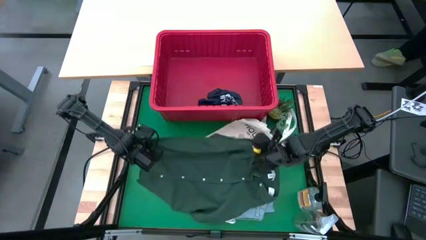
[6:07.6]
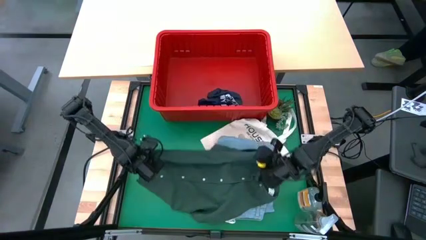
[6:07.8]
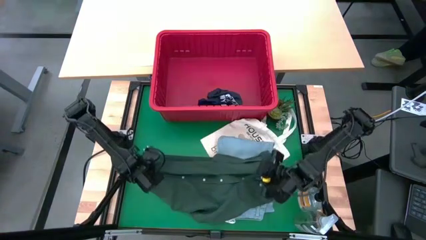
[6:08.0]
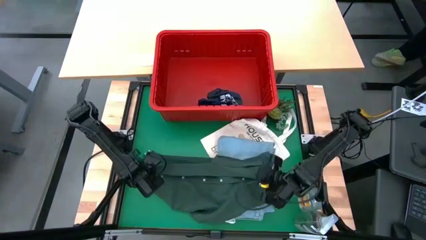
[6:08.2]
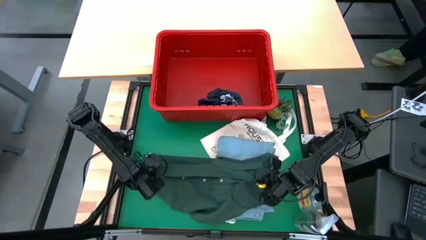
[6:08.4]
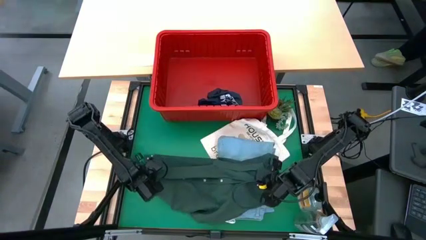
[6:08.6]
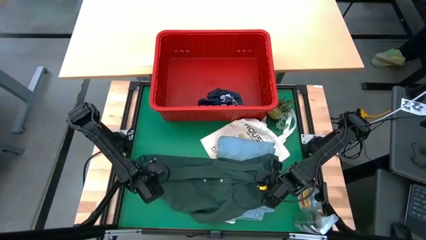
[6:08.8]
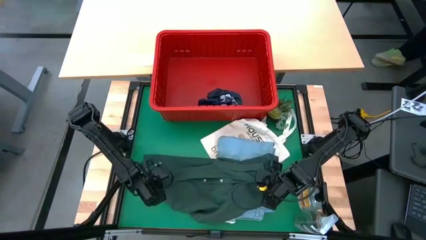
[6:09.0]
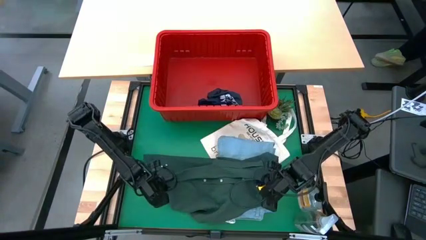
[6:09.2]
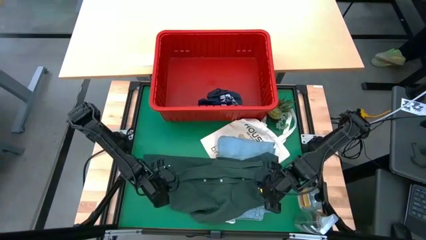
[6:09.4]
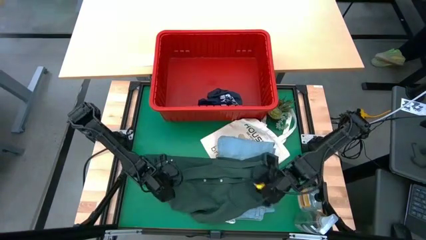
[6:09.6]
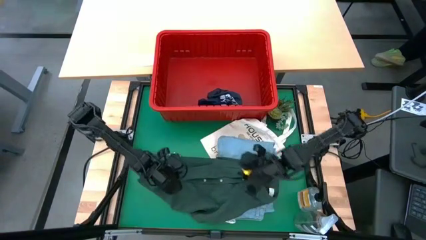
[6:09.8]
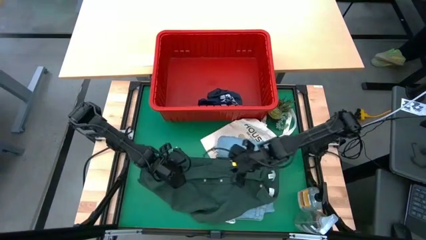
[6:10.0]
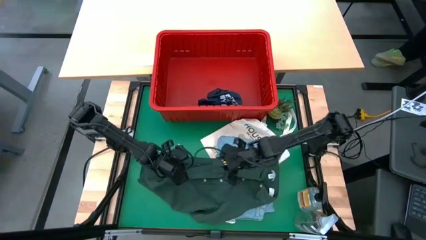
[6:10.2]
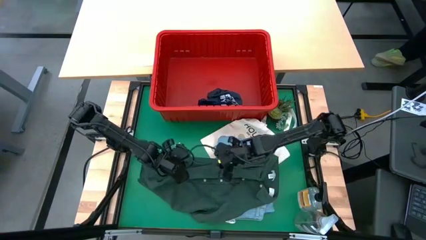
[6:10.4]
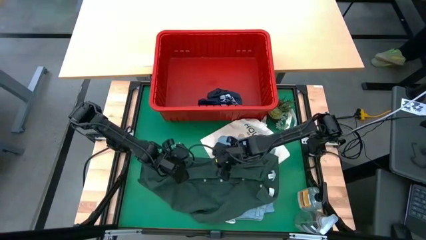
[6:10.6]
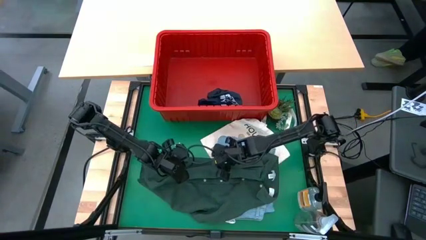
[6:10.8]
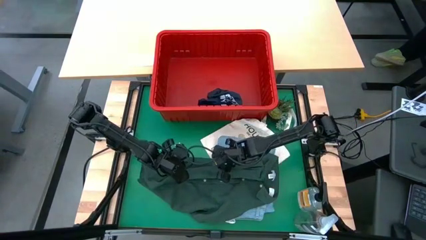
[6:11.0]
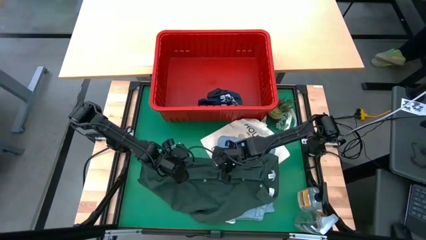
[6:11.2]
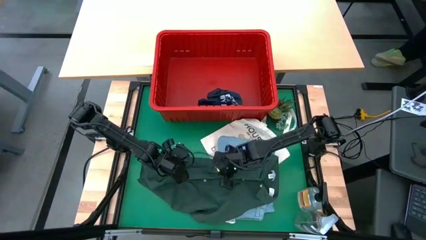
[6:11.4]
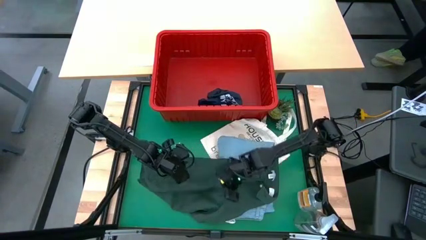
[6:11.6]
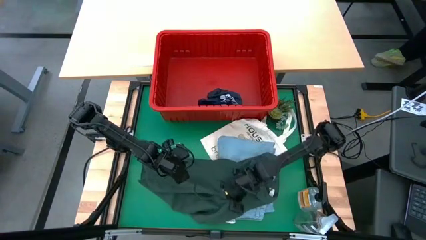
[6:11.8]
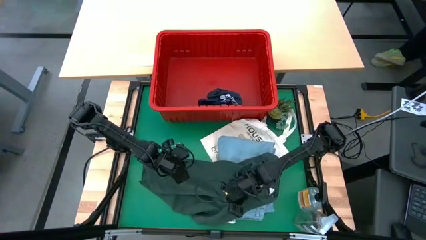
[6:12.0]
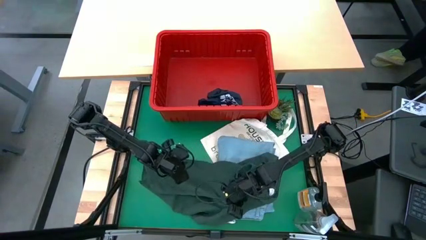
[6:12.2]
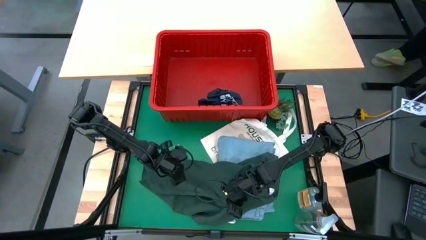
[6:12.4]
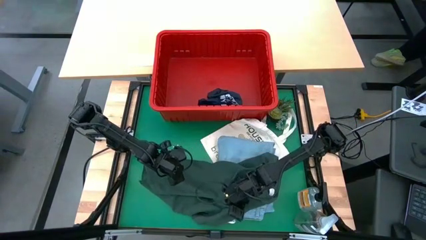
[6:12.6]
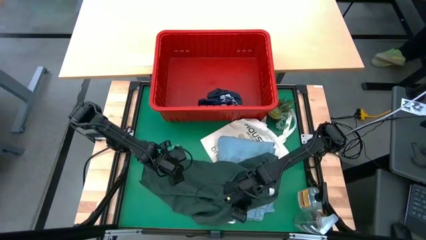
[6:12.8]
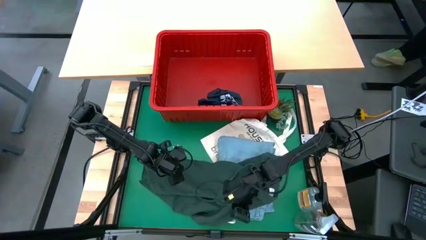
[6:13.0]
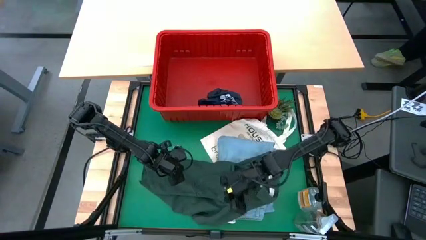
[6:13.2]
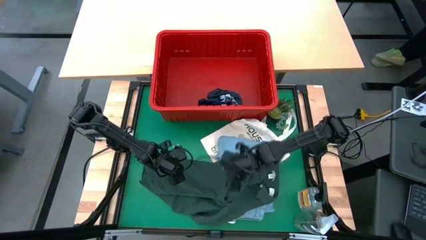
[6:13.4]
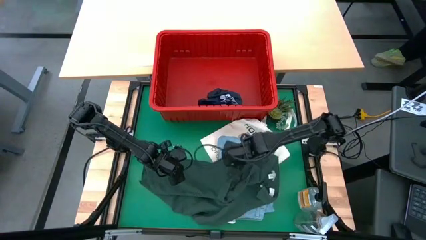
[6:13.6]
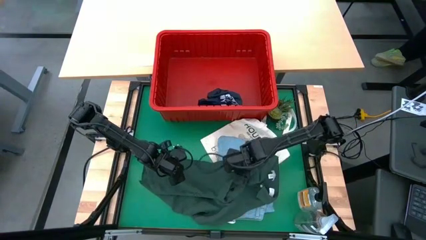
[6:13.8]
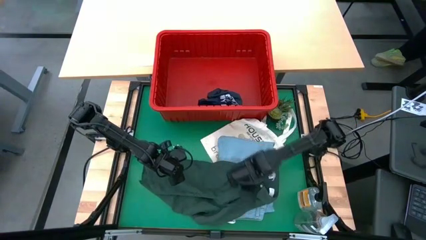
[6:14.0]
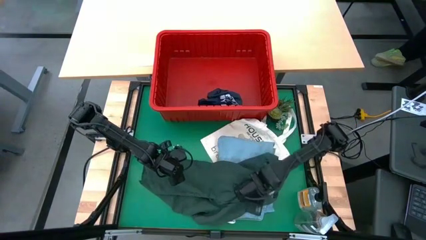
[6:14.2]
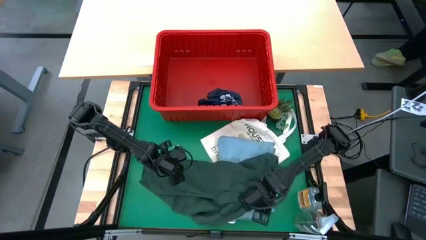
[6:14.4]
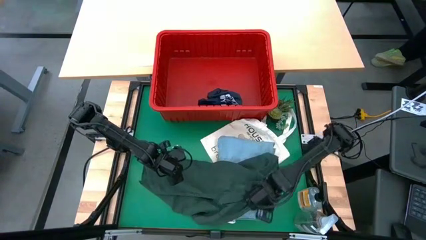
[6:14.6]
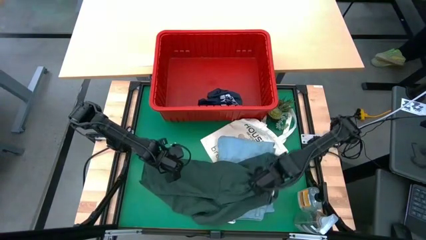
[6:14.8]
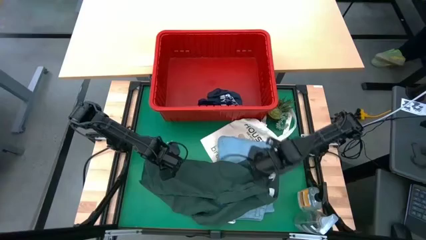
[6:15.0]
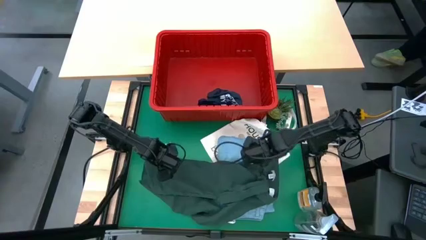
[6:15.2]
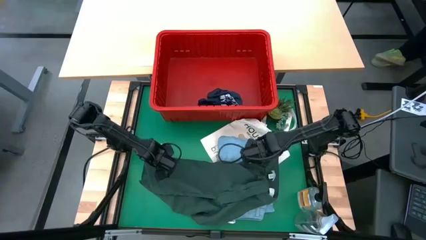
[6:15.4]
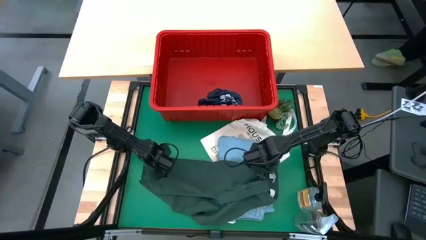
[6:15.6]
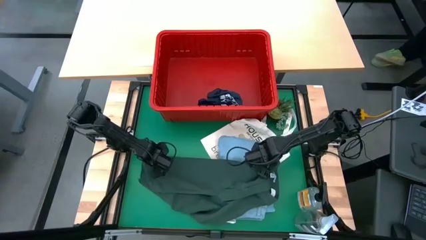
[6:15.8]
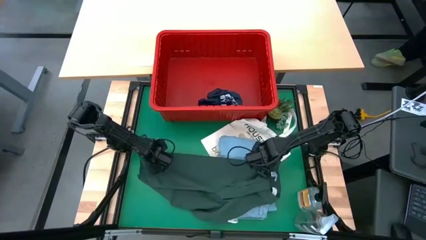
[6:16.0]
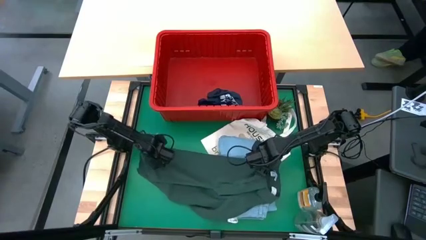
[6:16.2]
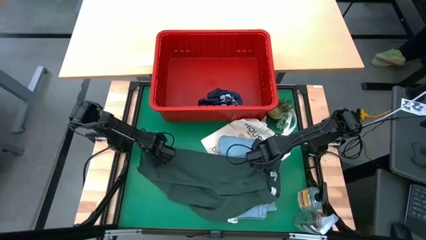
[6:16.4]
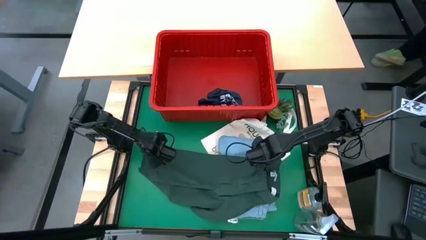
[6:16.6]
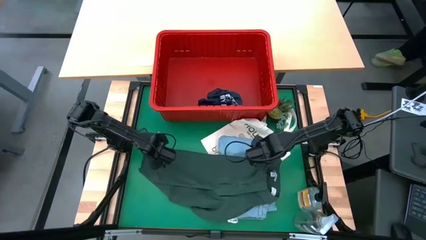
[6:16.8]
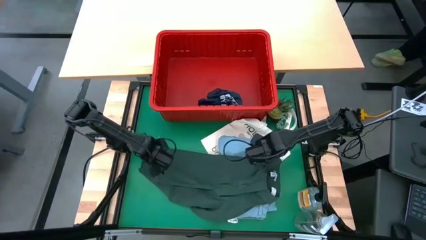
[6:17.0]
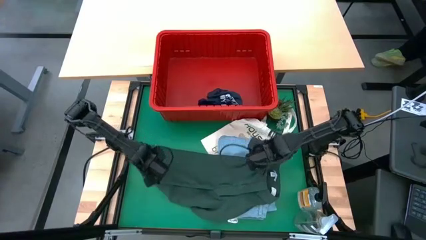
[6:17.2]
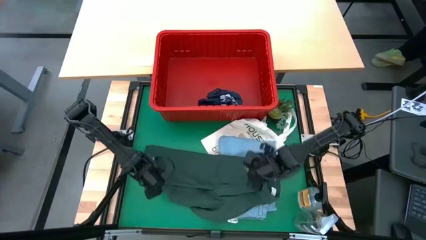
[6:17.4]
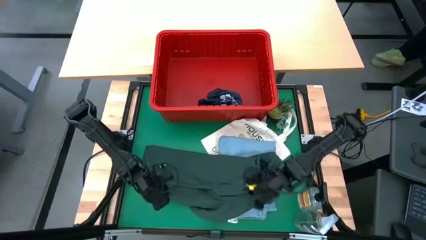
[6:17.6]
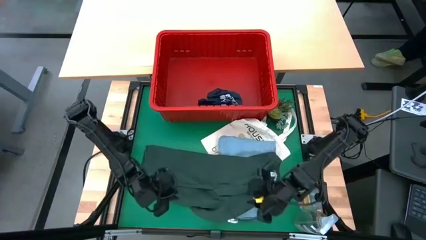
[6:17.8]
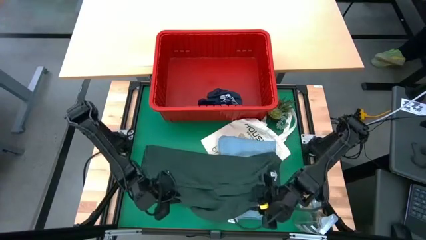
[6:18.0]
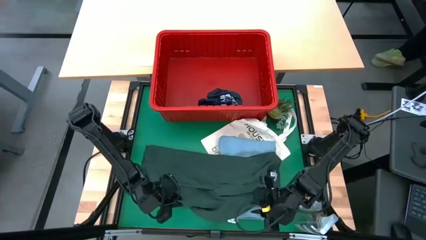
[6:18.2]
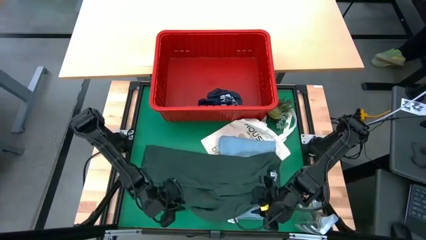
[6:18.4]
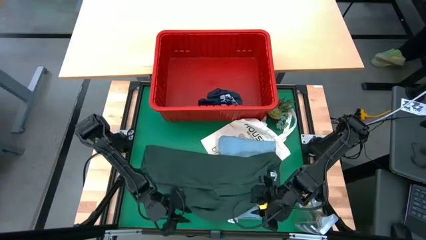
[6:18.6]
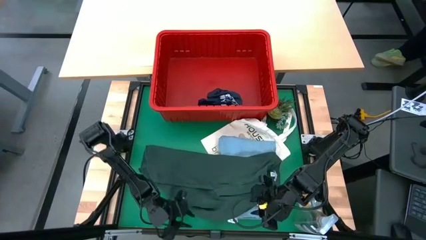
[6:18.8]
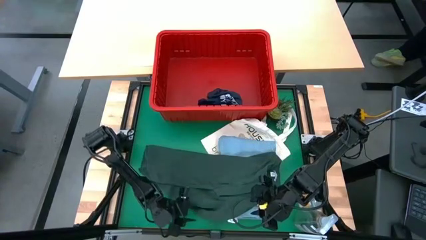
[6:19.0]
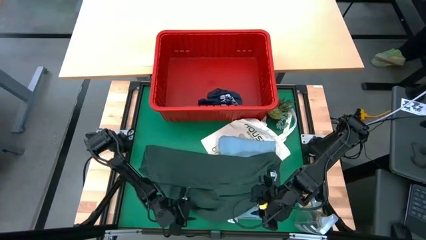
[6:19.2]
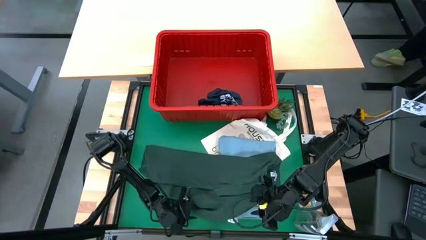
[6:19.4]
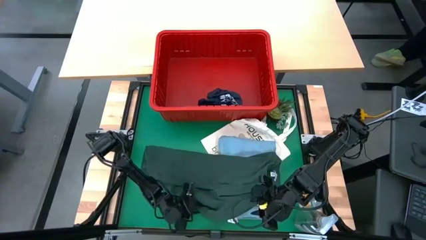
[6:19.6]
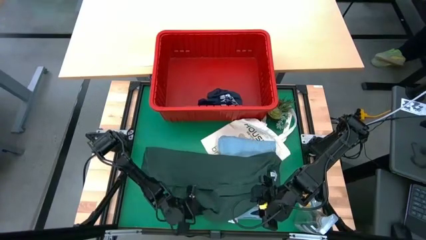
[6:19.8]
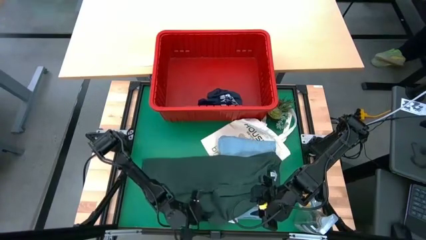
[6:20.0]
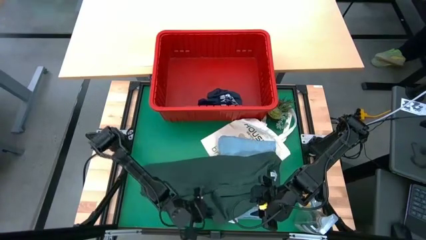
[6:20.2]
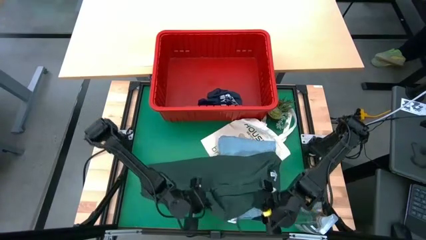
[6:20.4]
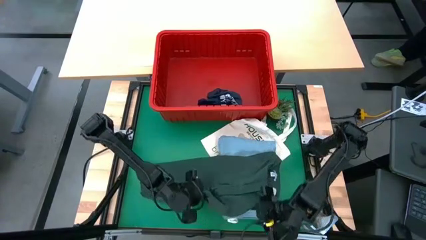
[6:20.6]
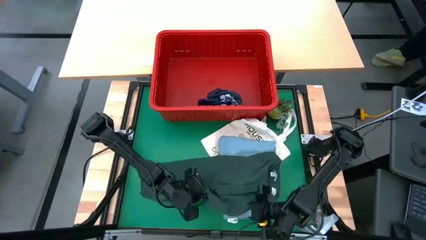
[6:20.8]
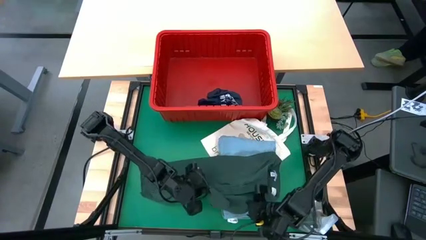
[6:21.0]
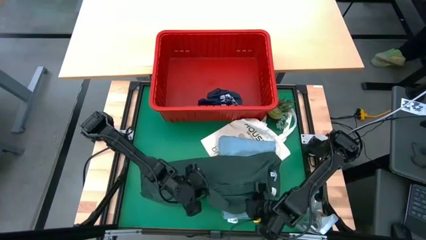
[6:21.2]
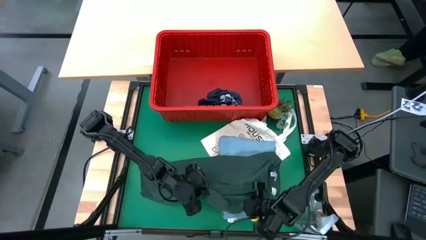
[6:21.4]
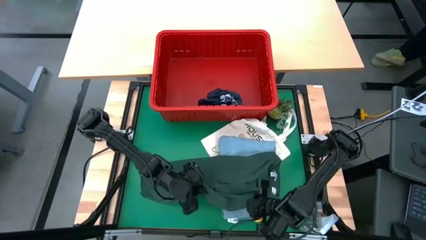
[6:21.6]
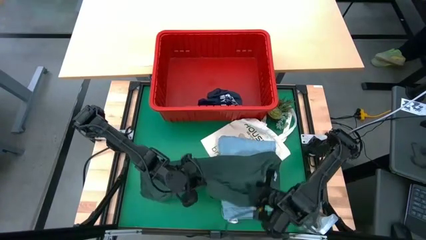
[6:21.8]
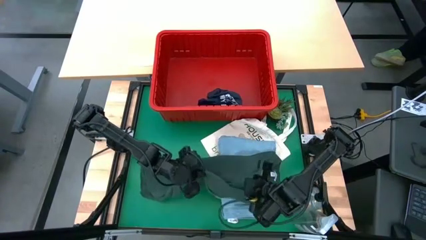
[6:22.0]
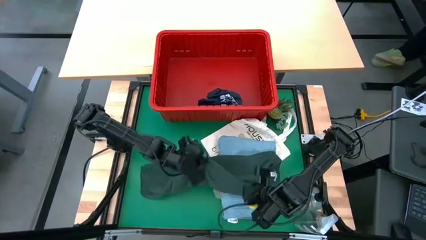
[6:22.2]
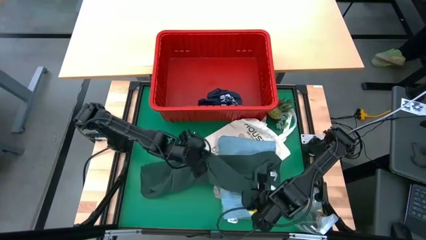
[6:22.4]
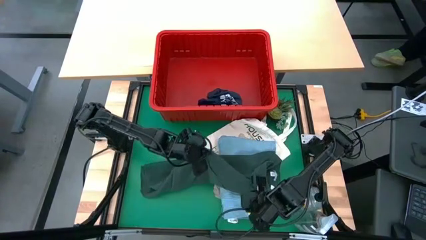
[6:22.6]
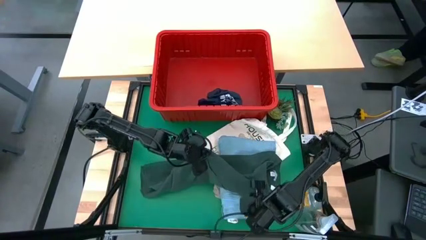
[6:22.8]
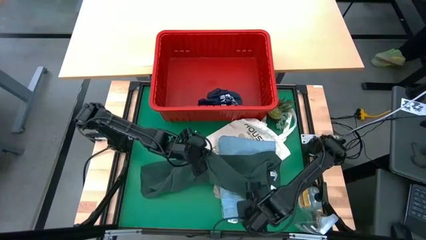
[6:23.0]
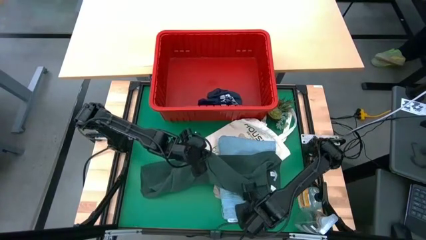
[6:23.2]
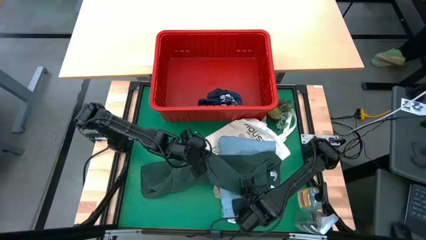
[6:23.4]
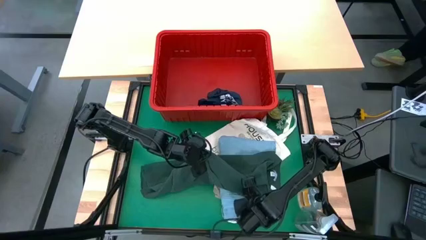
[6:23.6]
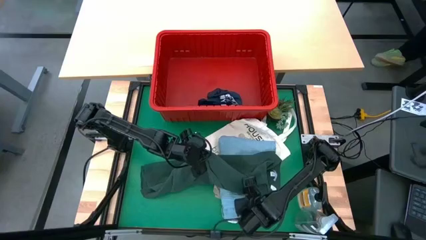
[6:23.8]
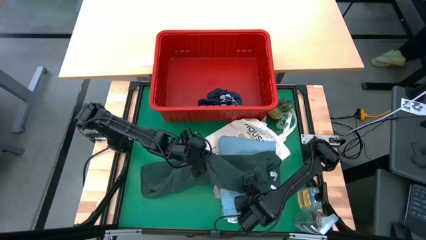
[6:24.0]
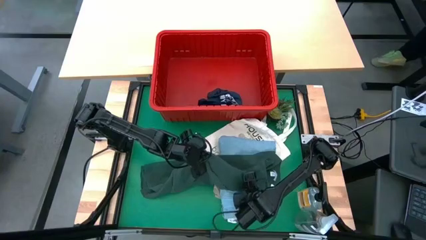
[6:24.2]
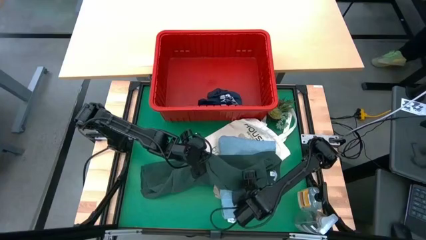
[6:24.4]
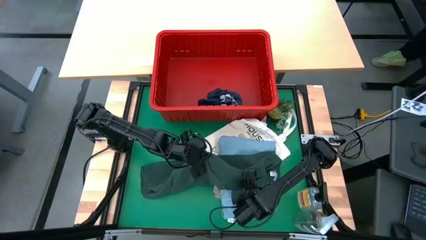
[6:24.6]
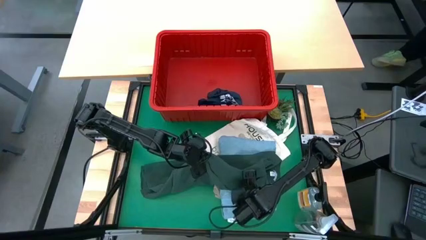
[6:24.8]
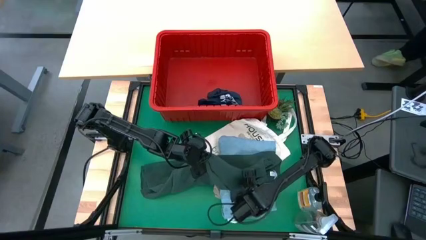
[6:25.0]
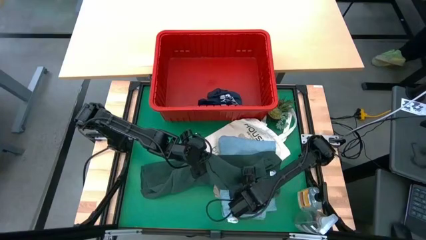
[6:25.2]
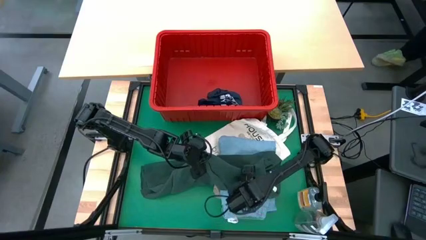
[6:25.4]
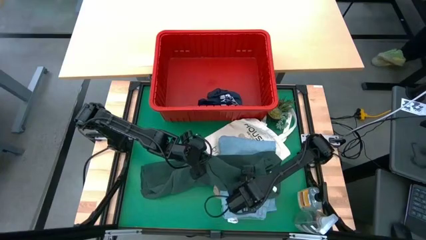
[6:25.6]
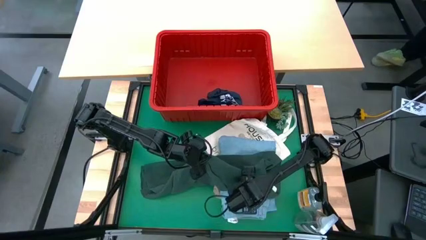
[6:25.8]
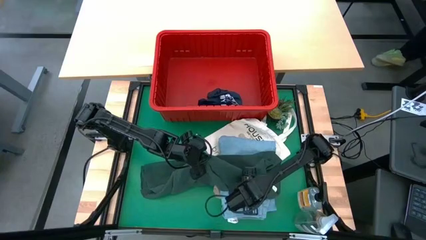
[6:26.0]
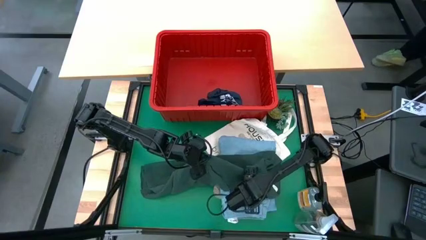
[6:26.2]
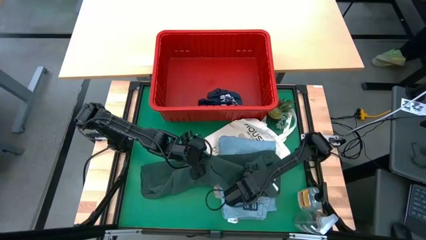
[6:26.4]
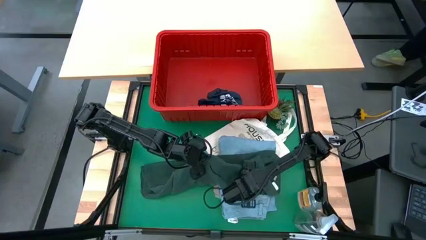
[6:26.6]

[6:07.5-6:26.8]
Task: Fold Laundry from Bin
Fold the green polo shirt
